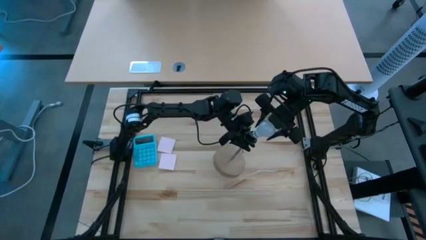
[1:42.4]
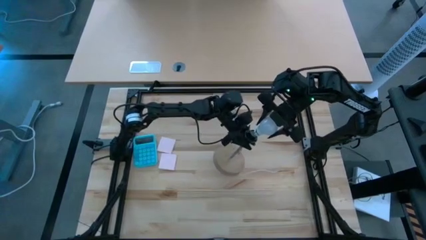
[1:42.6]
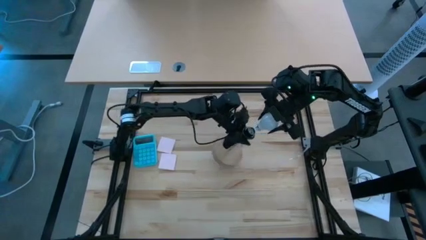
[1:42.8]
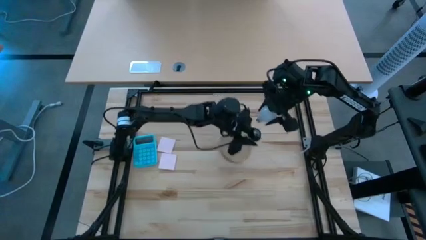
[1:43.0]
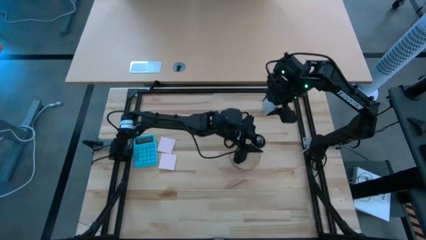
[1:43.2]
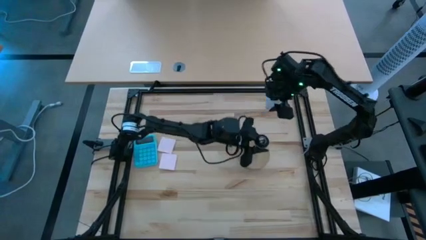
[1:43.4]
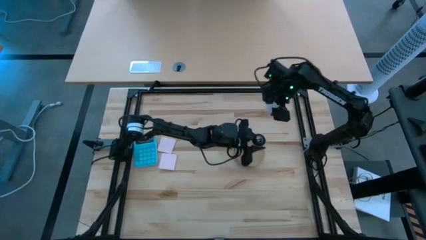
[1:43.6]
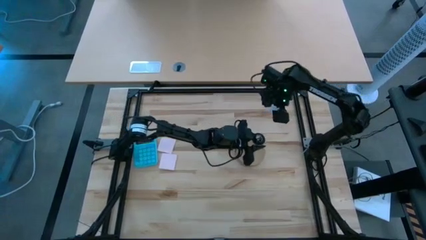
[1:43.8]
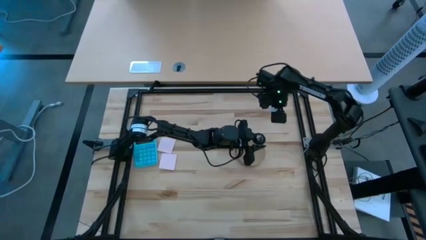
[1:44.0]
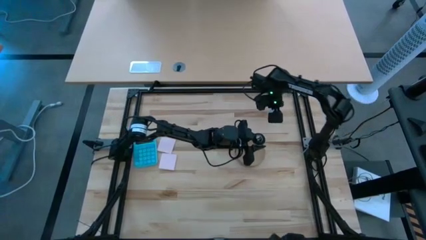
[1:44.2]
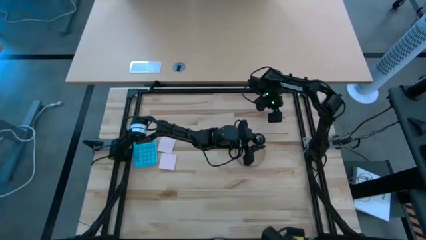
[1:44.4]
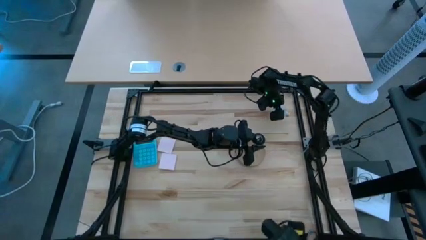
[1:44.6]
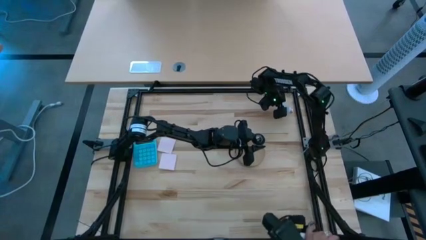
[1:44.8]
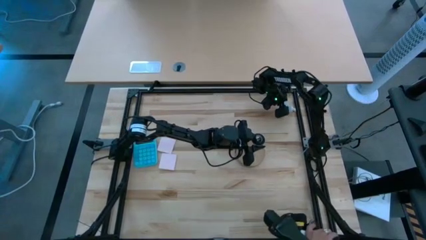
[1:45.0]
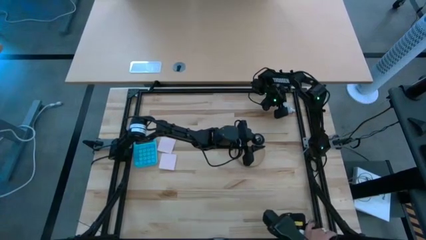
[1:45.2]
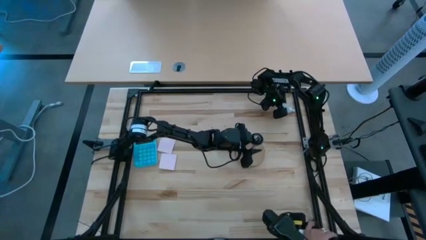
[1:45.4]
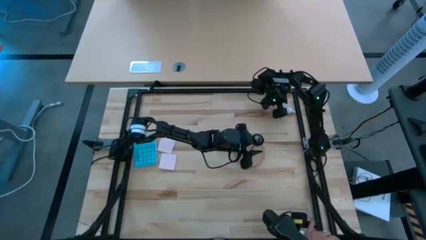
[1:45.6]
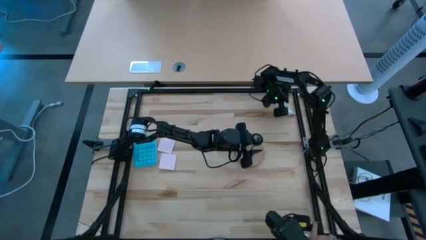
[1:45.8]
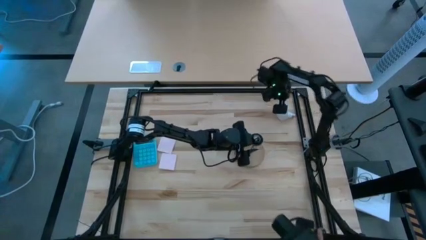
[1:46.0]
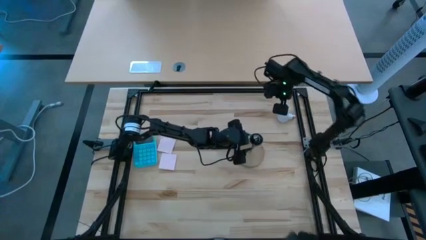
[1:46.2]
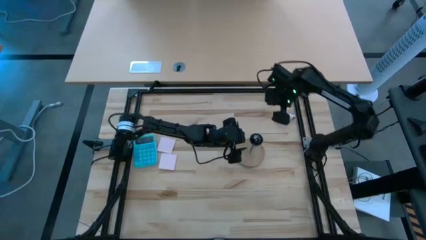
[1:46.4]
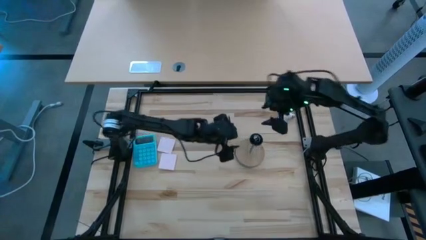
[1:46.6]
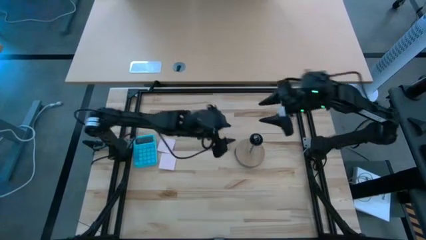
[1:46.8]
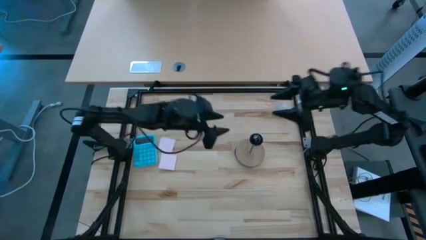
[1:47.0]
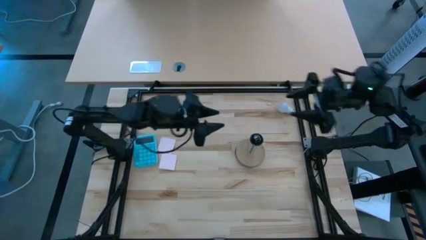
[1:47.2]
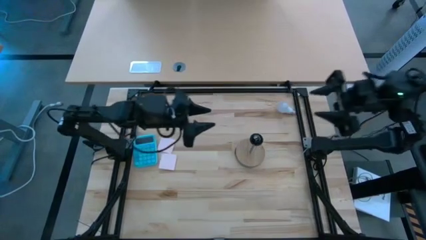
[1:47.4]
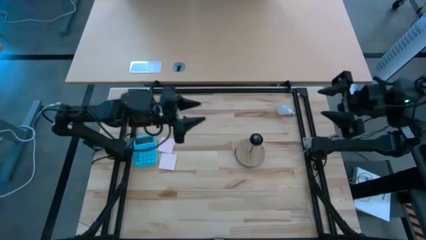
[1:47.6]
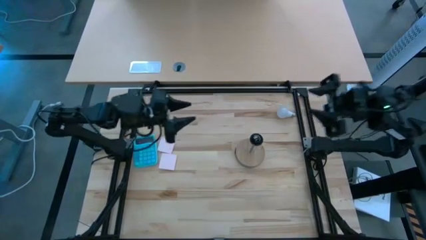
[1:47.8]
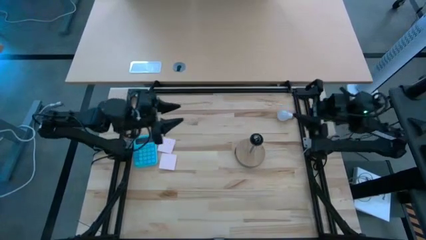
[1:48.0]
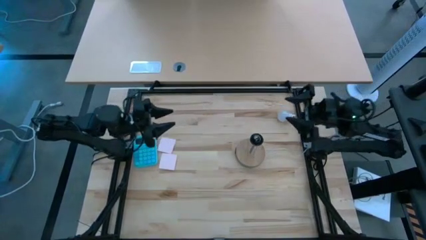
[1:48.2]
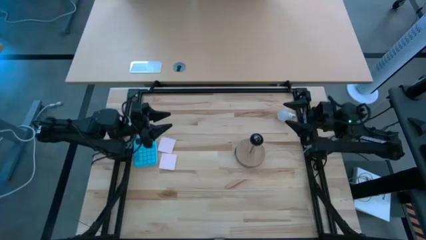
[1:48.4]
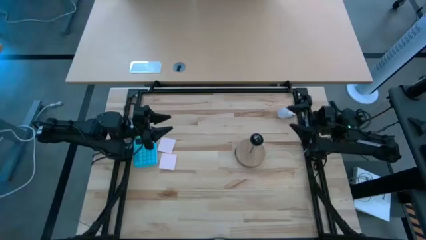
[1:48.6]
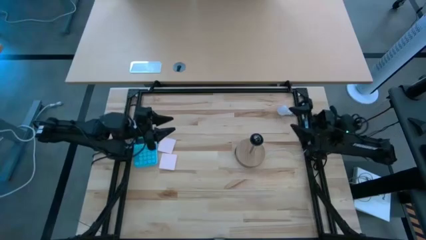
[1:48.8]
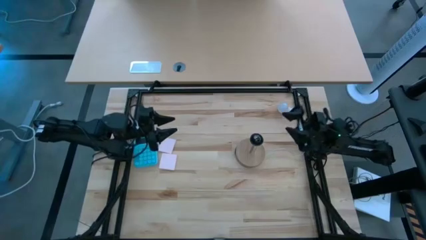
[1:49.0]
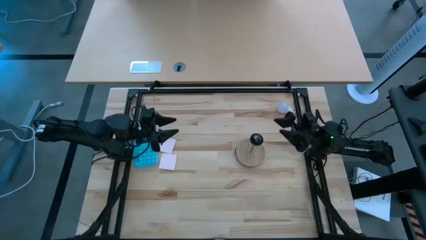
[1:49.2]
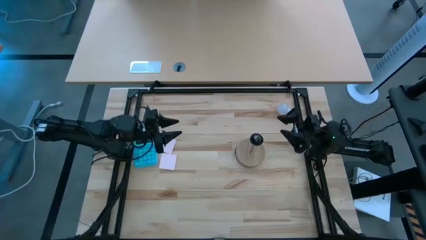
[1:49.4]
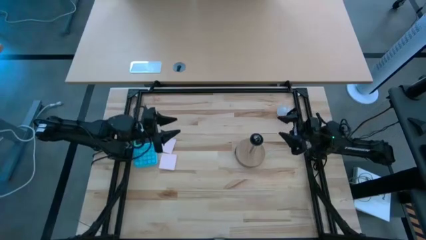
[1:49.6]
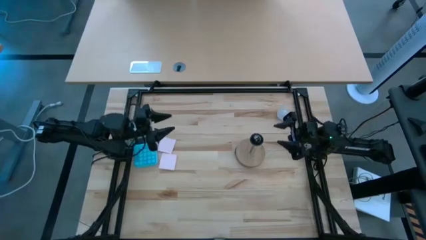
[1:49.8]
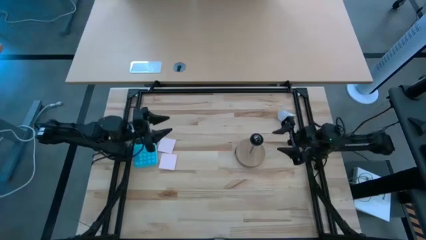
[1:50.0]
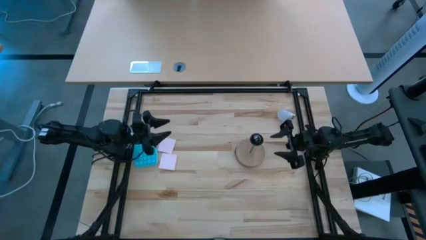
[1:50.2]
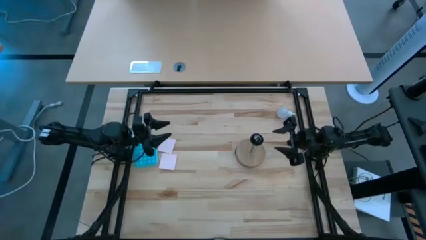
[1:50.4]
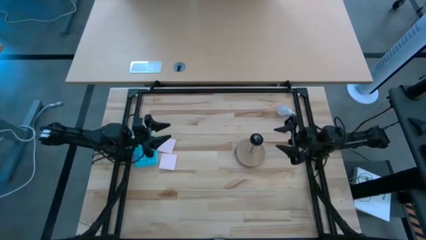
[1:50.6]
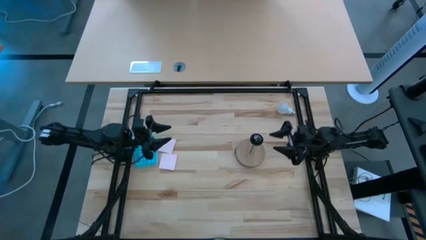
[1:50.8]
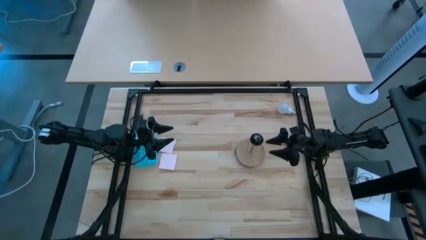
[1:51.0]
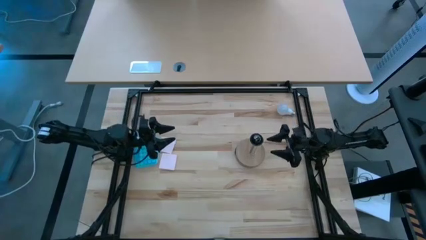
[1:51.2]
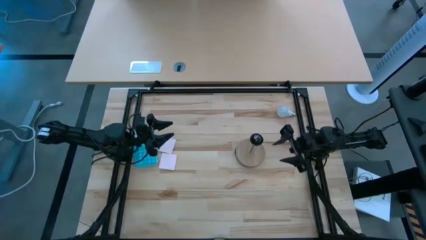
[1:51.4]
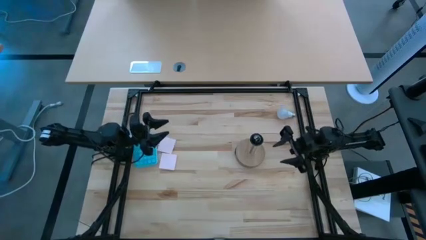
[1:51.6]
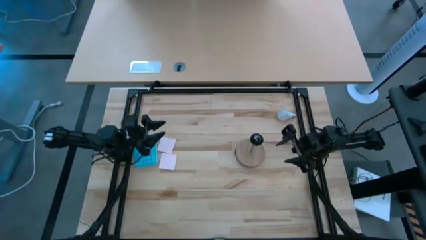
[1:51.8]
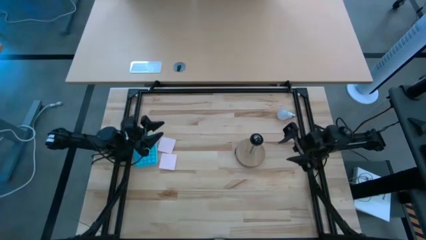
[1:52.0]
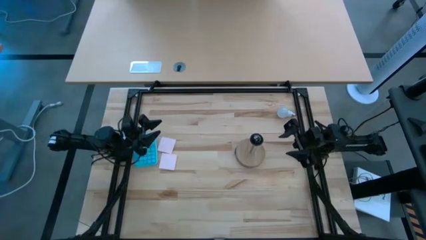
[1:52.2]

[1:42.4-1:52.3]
Task: Screw lightbulb
Return to Home Position
